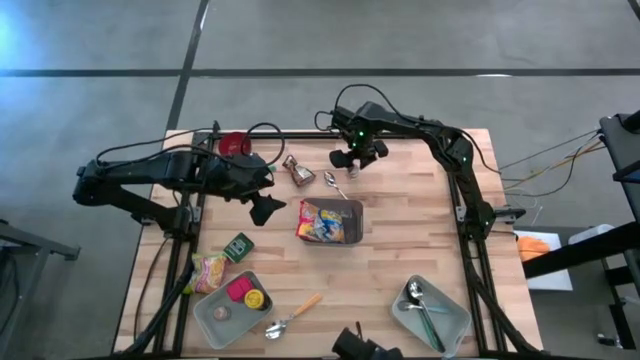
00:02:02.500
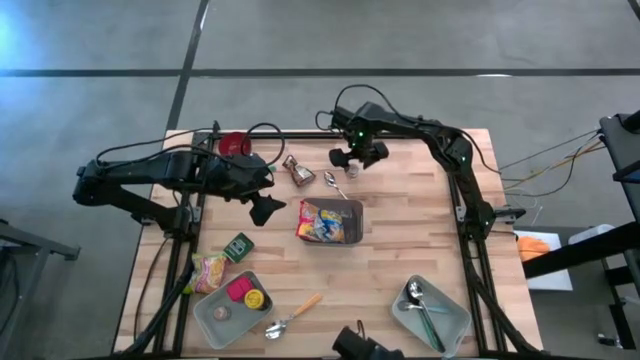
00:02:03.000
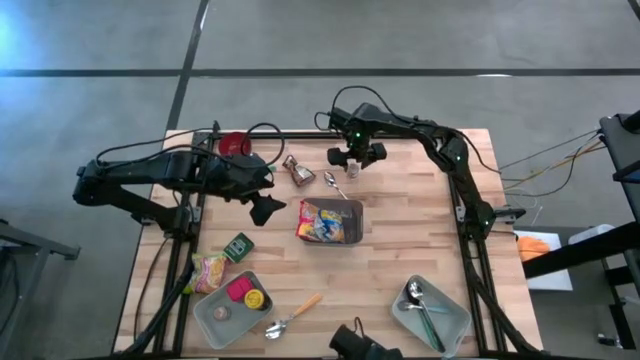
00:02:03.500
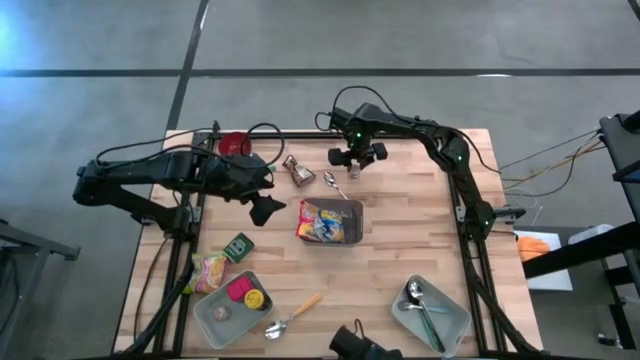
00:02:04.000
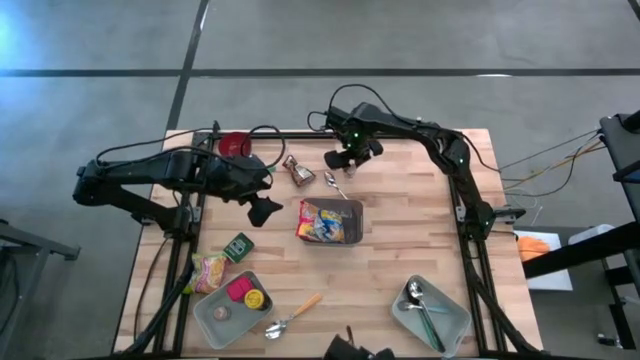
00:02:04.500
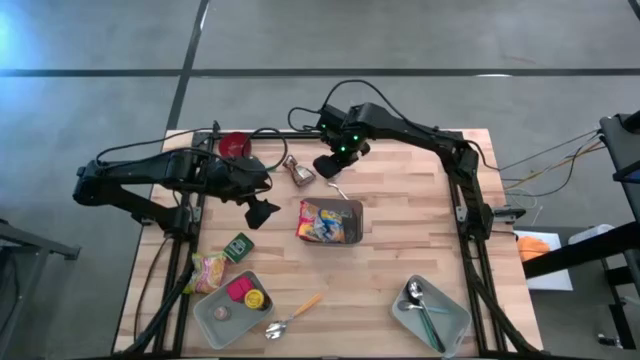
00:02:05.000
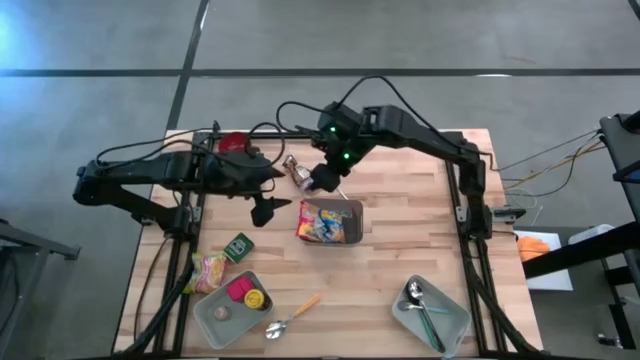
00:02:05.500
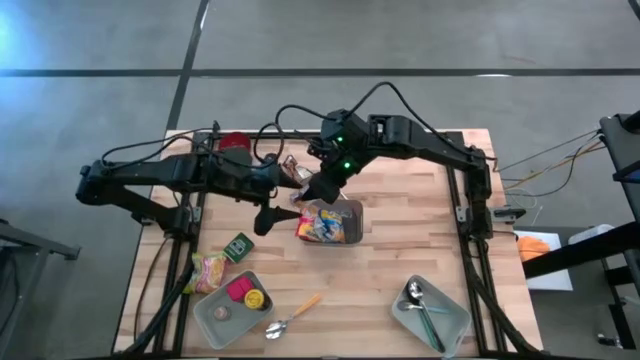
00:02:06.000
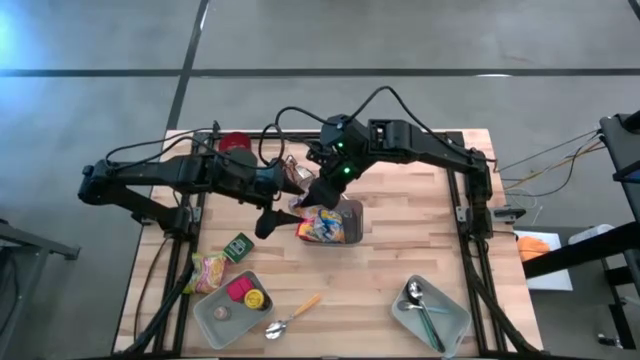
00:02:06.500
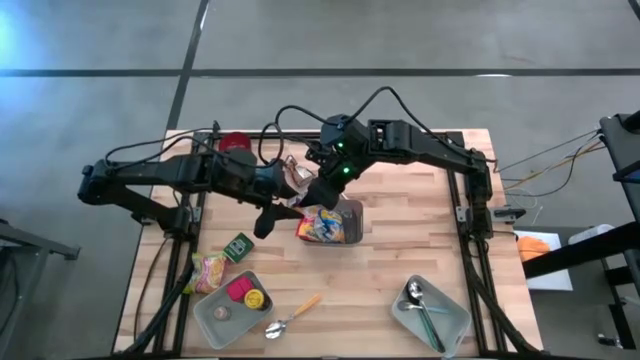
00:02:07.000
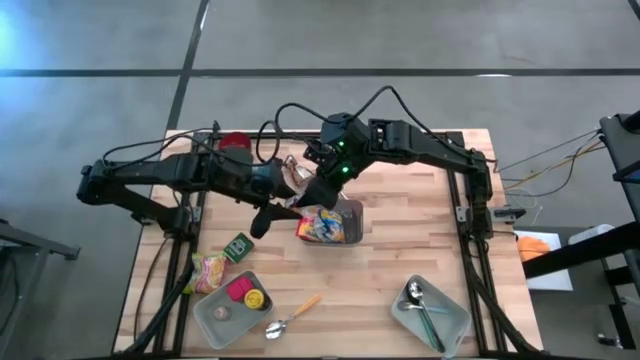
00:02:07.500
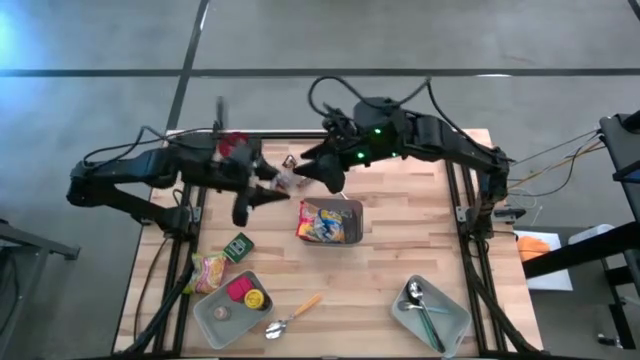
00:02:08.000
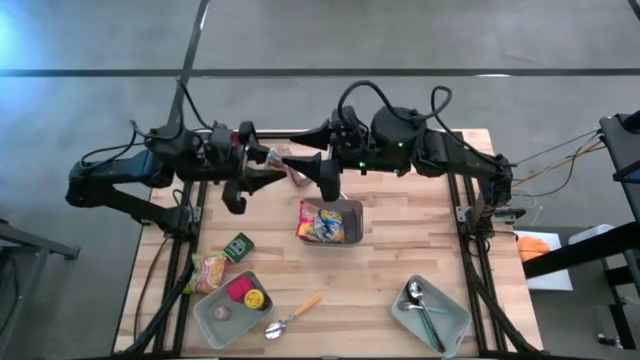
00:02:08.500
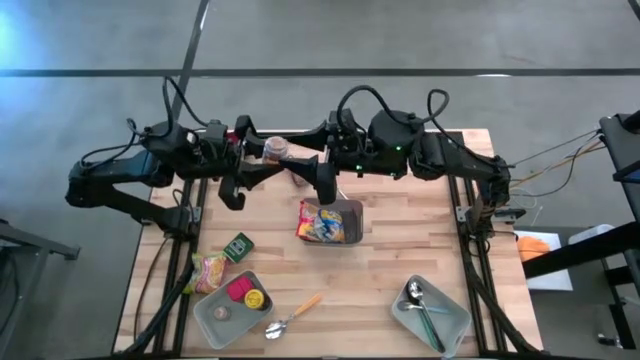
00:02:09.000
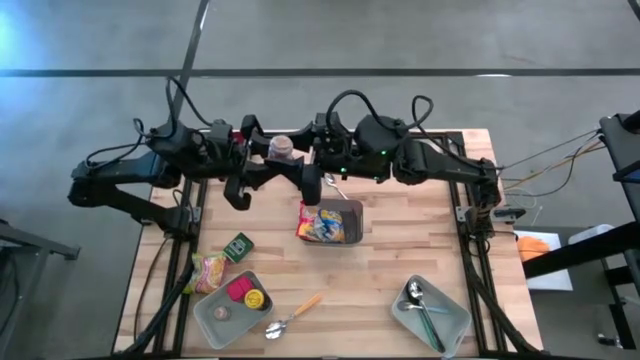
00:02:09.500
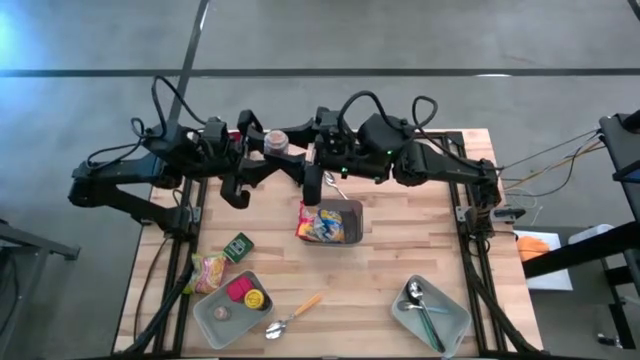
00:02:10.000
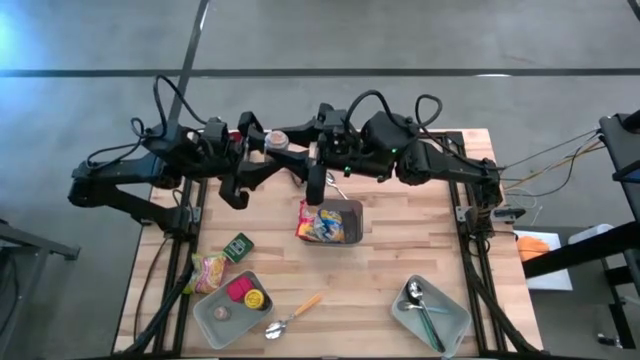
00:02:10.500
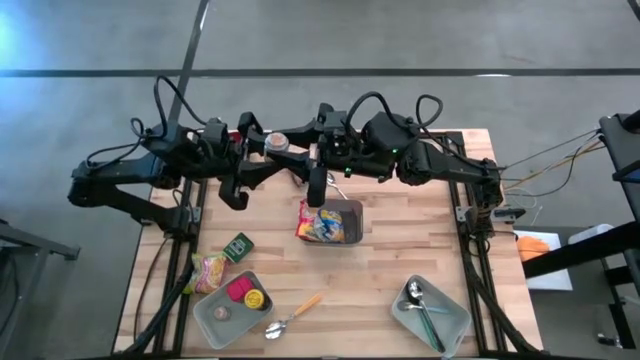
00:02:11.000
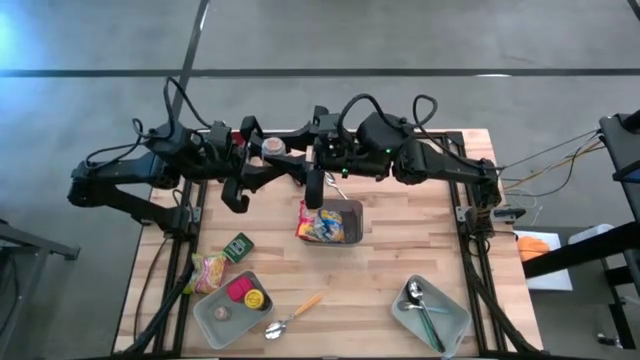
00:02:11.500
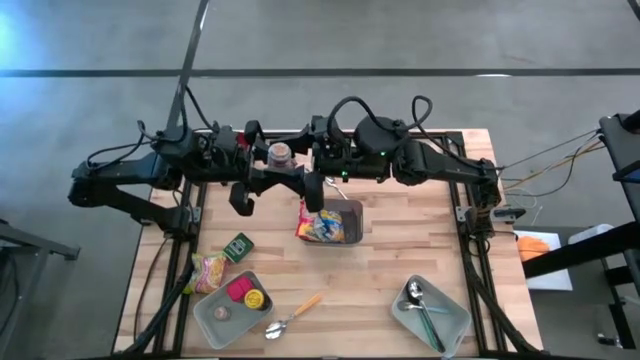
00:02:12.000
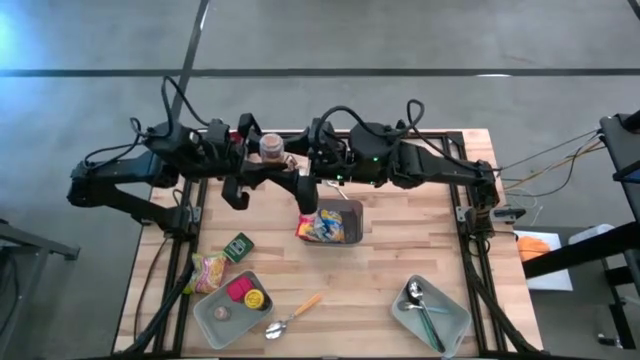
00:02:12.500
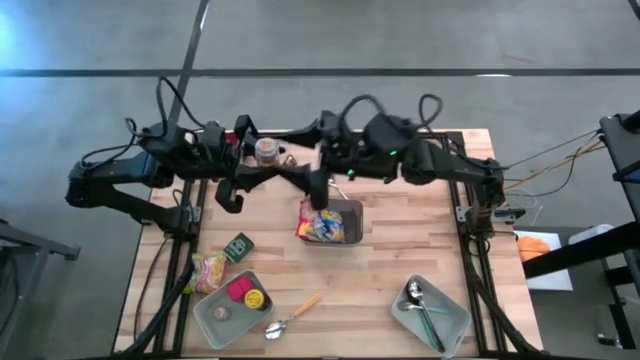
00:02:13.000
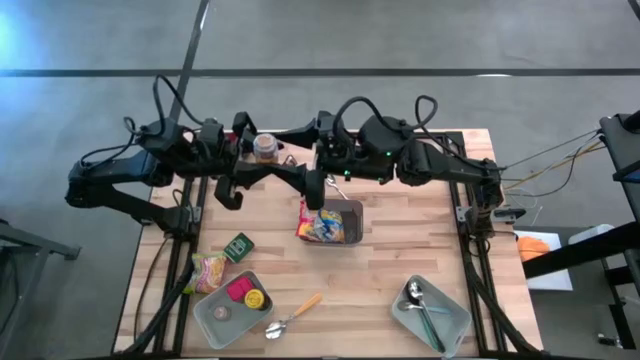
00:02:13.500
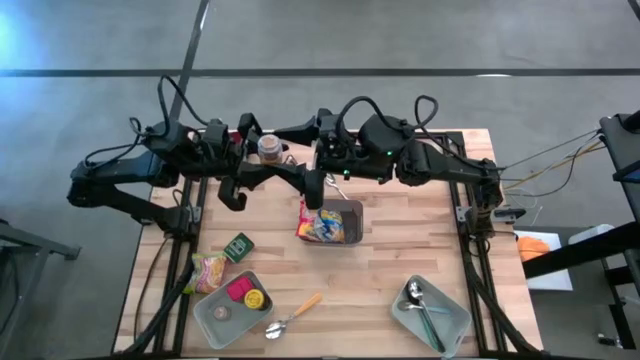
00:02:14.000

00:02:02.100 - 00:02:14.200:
Put the brown spice bottle into the left grey bin

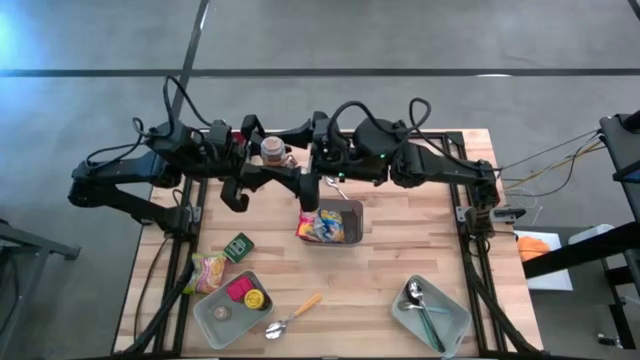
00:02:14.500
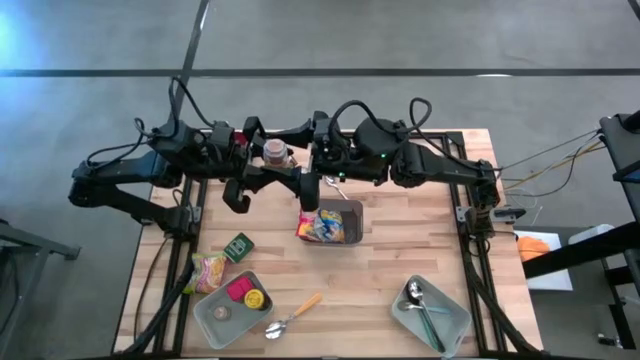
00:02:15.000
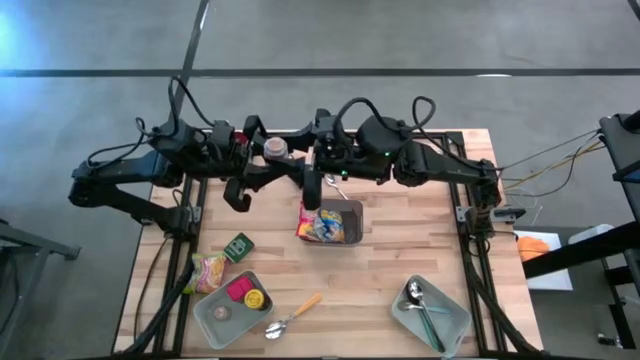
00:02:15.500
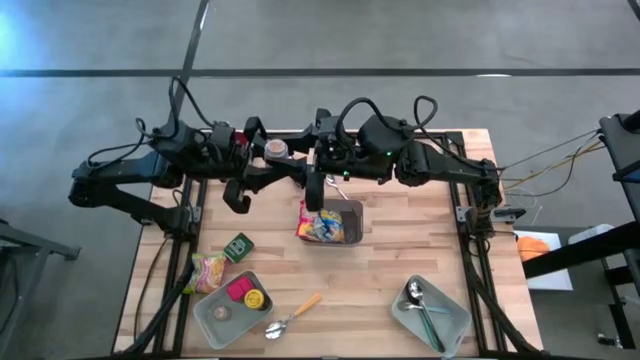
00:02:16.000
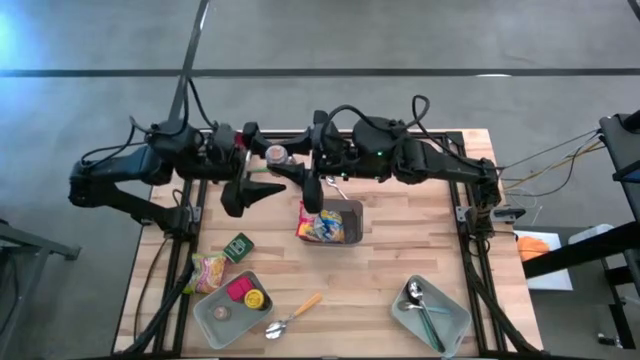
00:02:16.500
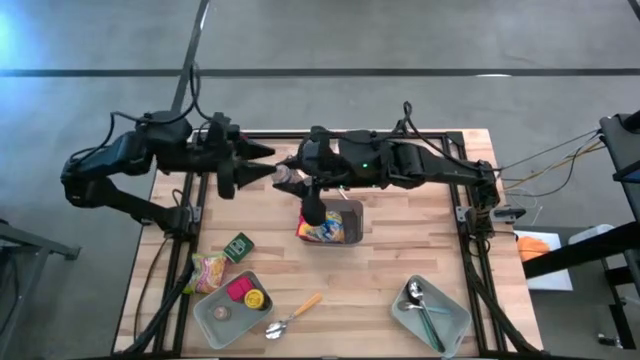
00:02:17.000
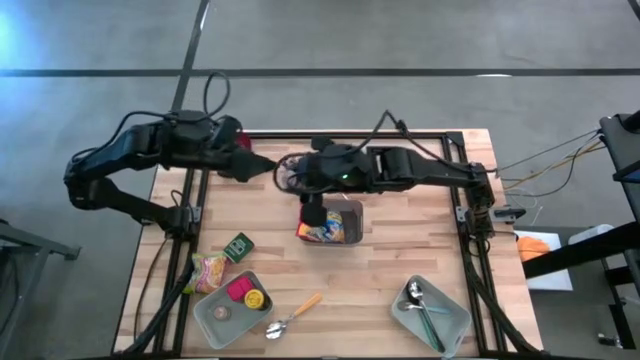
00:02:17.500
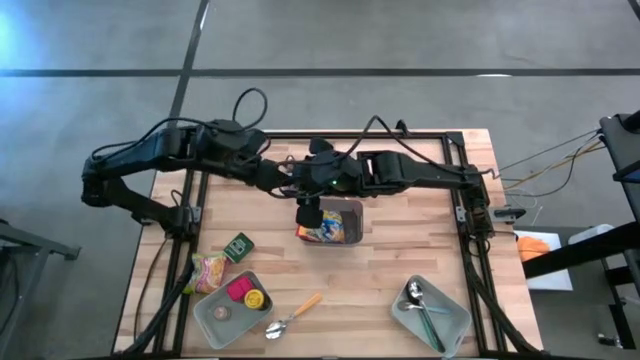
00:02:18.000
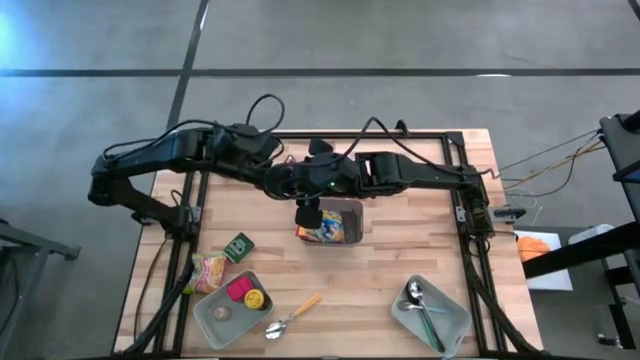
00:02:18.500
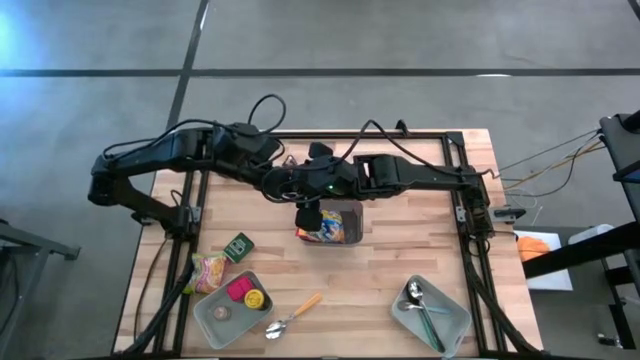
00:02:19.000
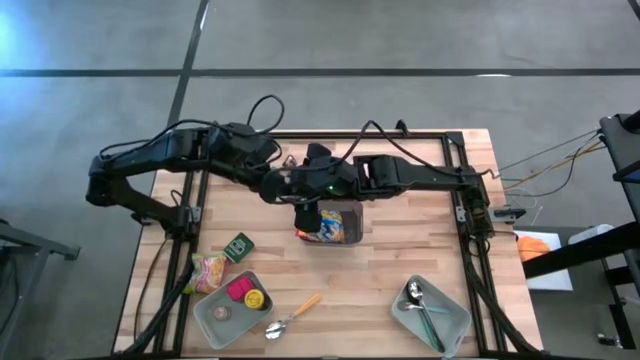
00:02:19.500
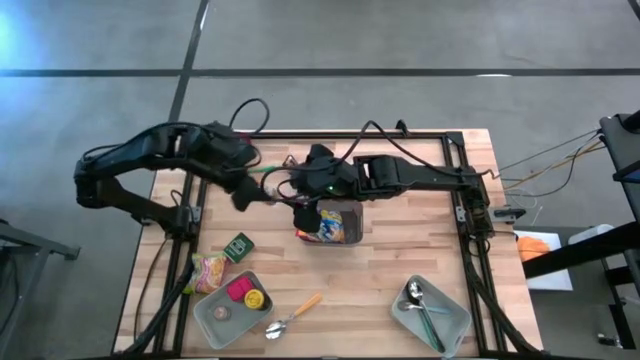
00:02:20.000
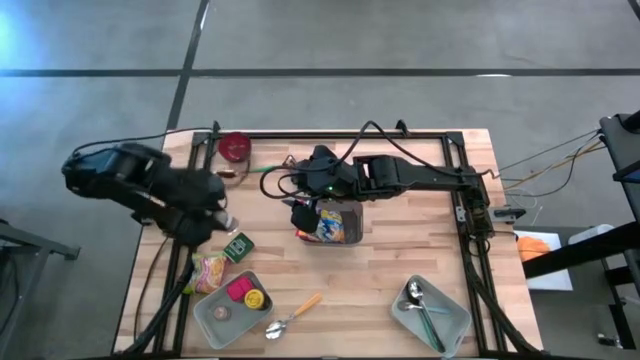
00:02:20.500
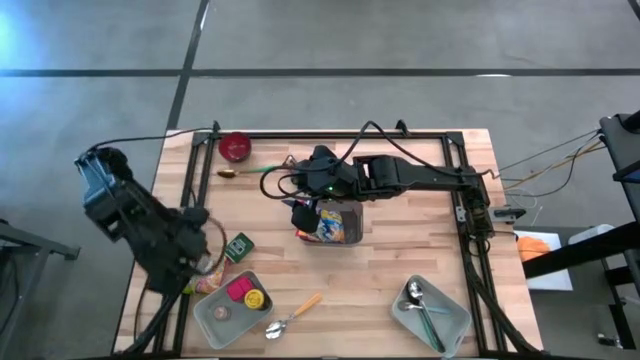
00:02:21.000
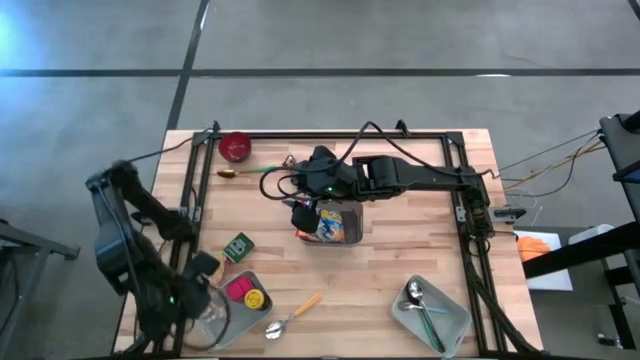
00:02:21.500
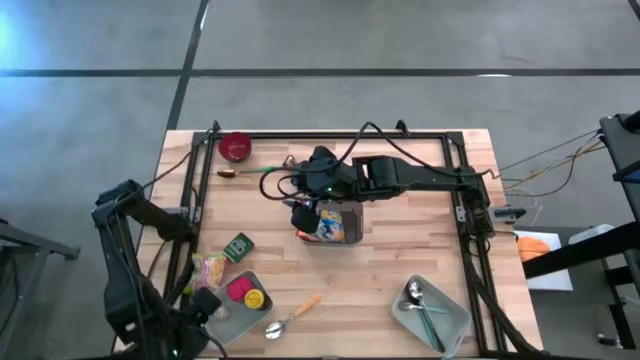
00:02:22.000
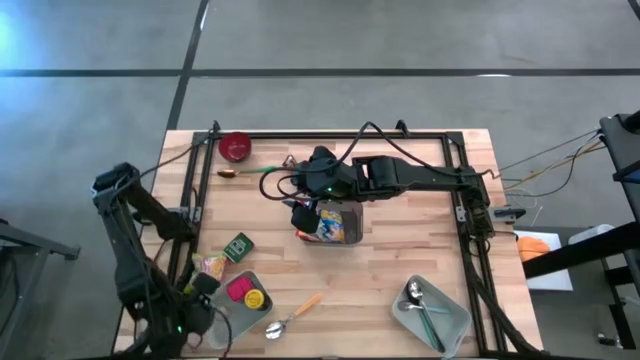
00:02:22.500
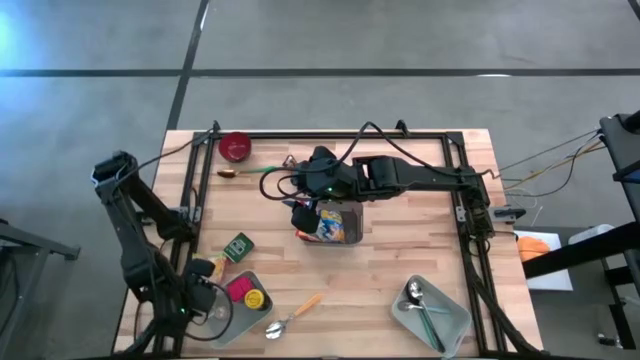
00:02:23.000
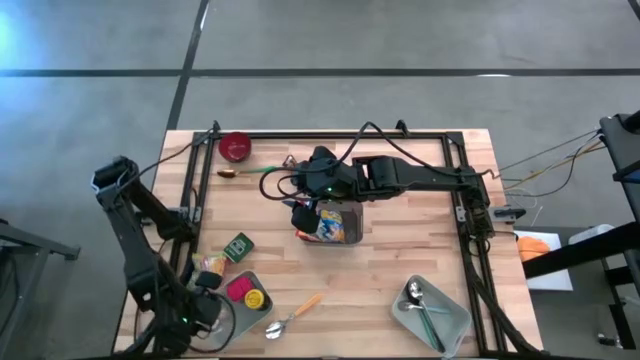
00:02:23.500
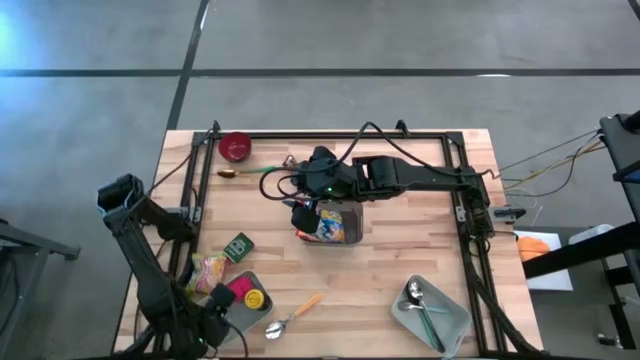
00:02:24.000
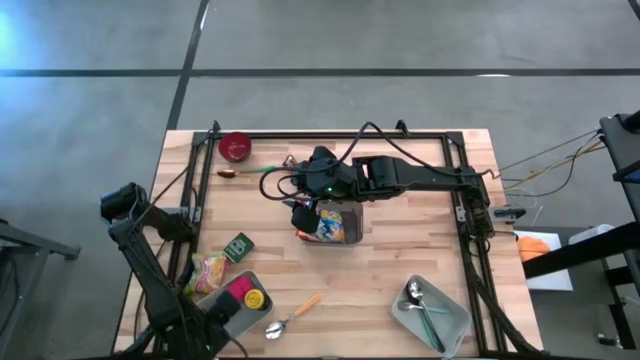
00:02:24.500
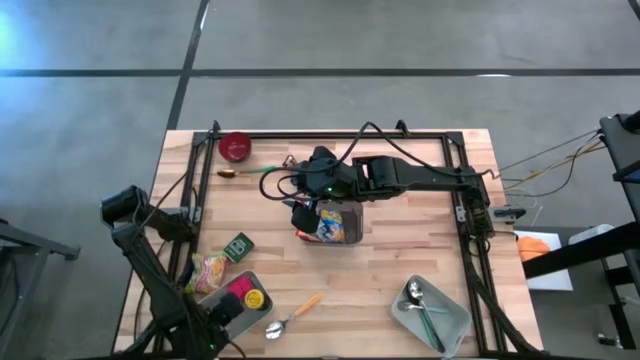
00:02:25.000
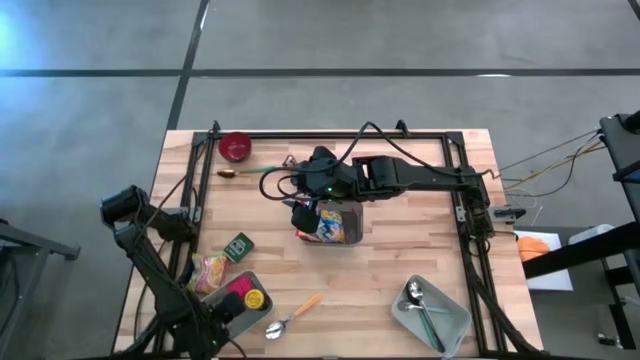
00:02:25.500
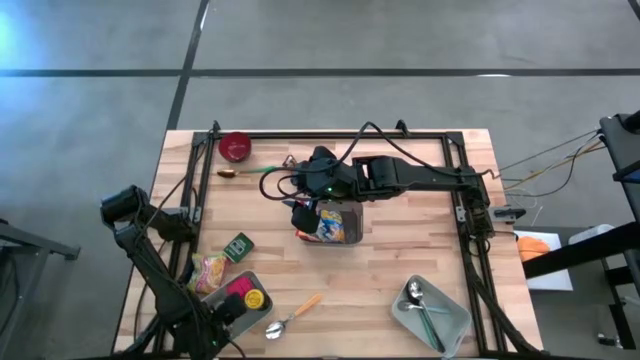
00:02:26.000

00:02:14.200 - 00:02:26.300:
Put the brown spice bottle into the left grey bin
